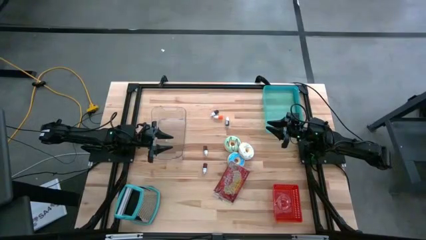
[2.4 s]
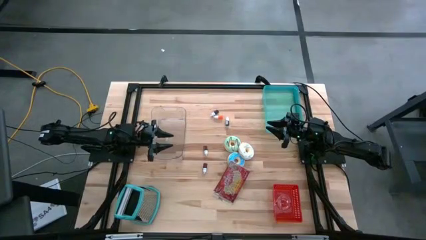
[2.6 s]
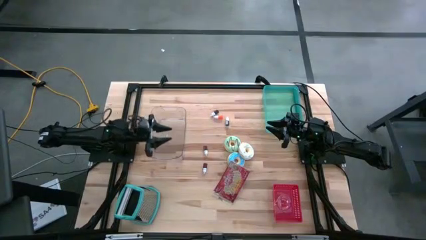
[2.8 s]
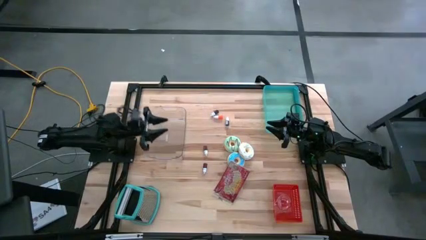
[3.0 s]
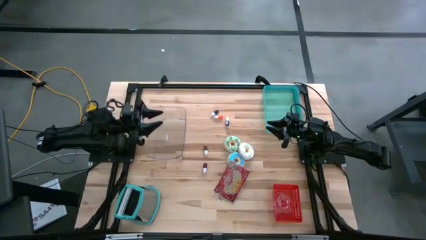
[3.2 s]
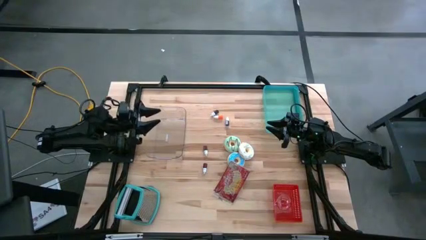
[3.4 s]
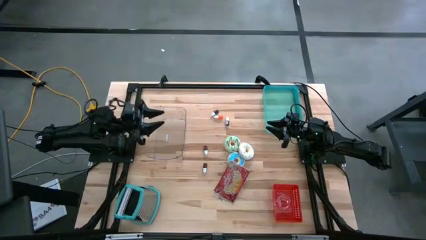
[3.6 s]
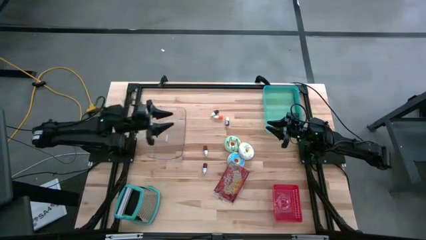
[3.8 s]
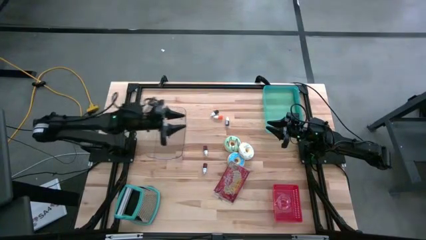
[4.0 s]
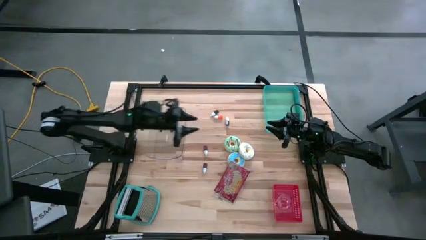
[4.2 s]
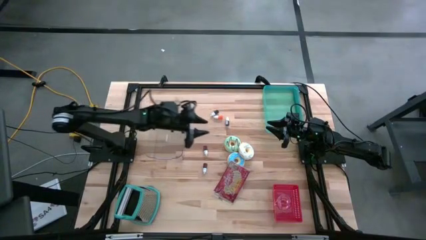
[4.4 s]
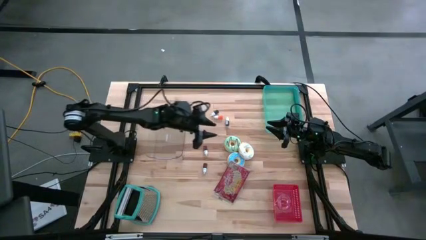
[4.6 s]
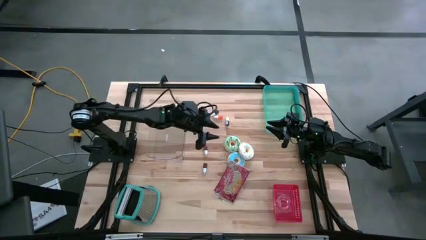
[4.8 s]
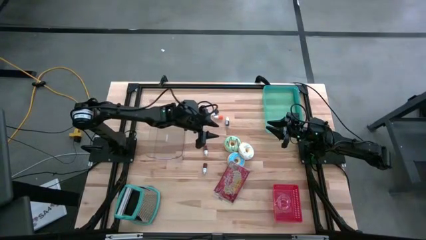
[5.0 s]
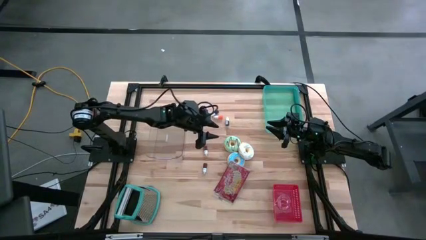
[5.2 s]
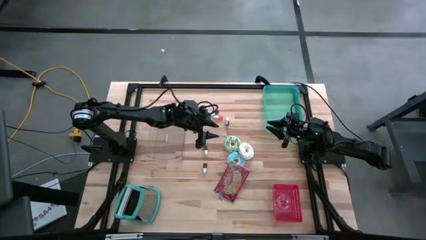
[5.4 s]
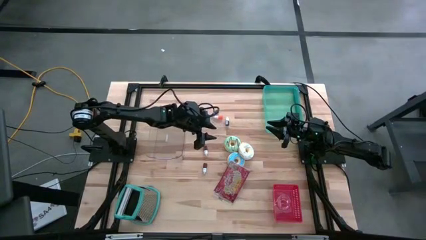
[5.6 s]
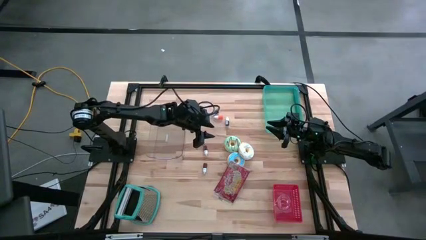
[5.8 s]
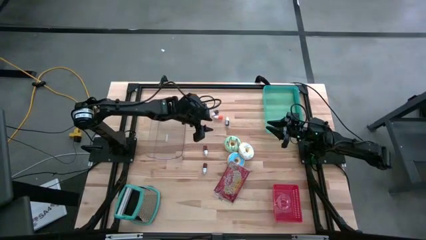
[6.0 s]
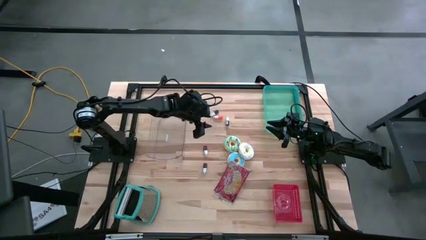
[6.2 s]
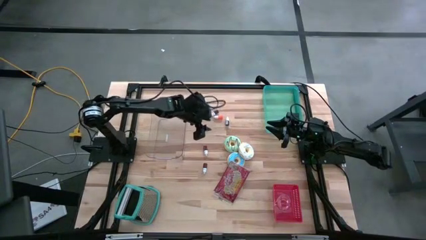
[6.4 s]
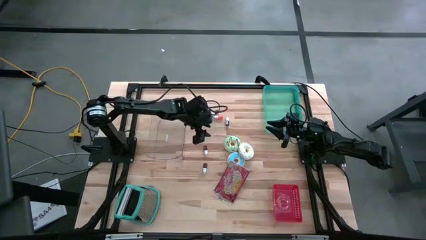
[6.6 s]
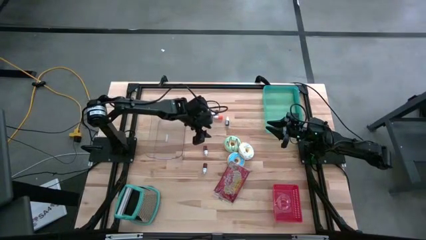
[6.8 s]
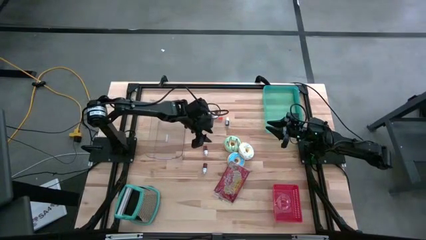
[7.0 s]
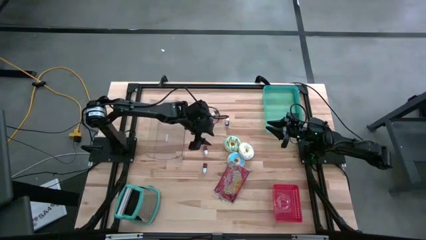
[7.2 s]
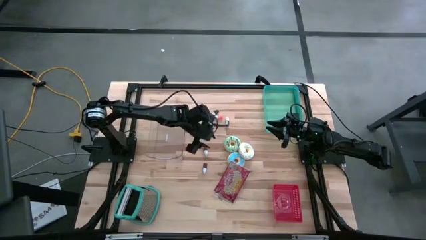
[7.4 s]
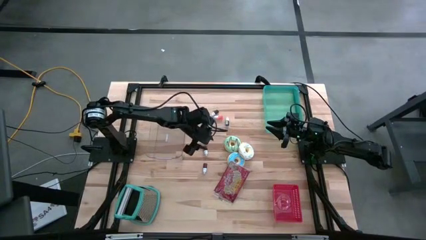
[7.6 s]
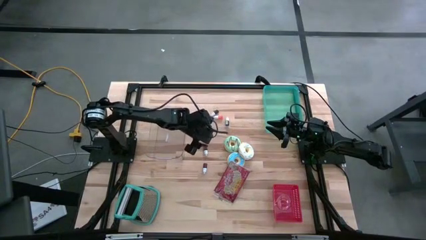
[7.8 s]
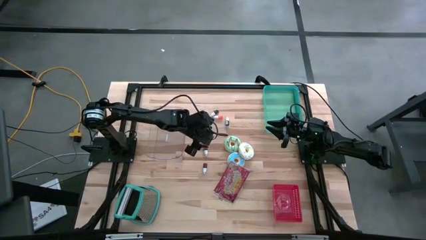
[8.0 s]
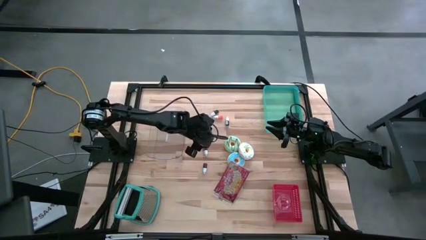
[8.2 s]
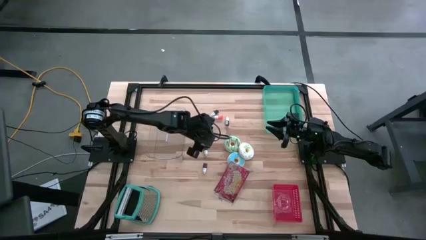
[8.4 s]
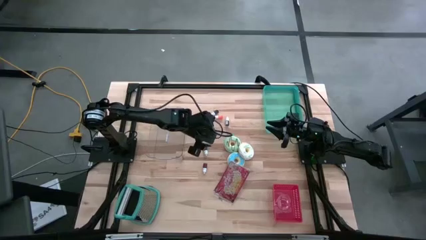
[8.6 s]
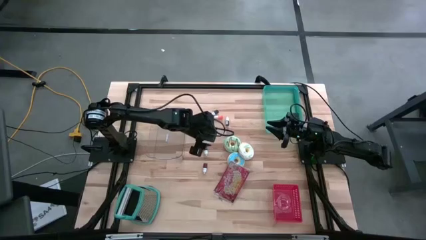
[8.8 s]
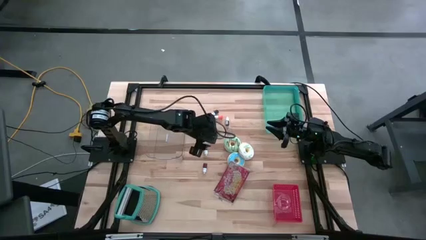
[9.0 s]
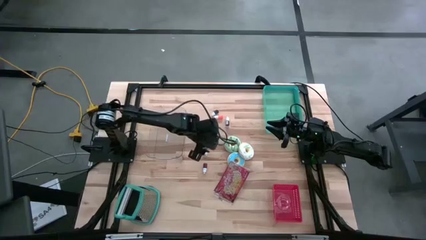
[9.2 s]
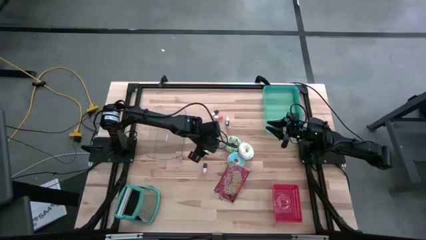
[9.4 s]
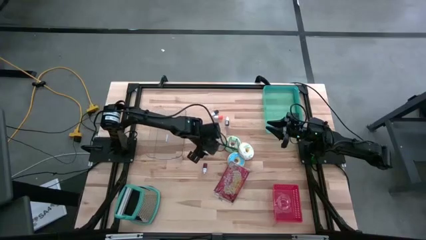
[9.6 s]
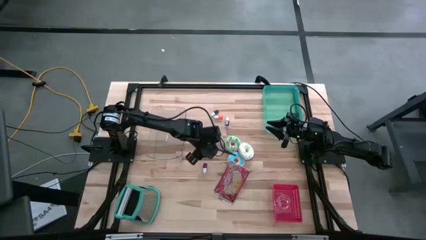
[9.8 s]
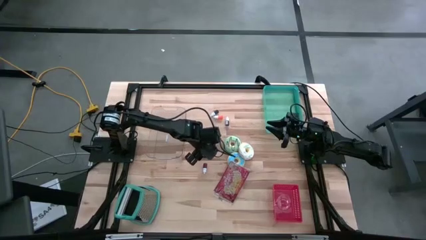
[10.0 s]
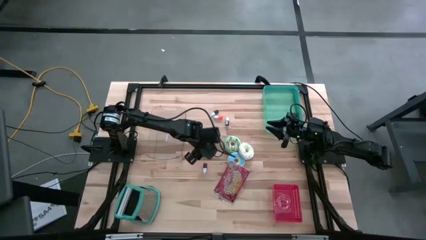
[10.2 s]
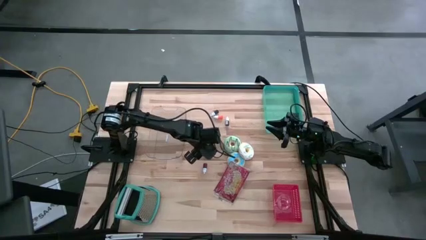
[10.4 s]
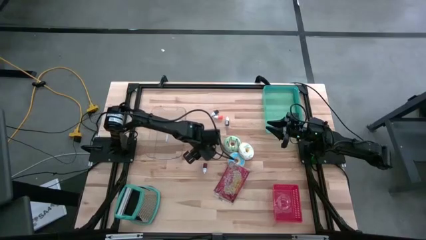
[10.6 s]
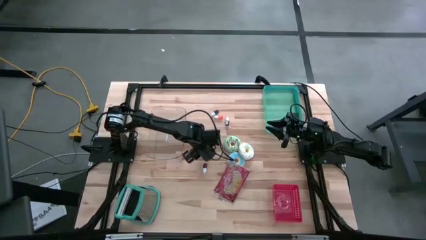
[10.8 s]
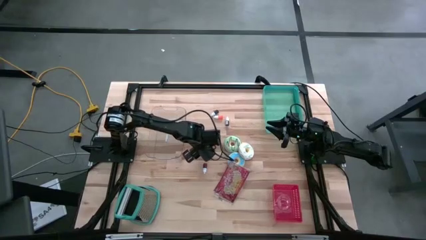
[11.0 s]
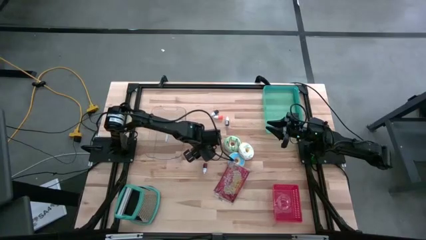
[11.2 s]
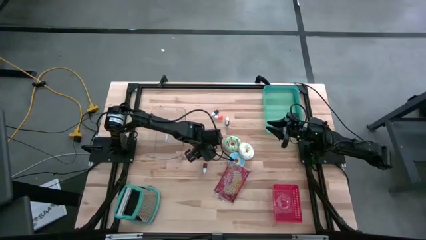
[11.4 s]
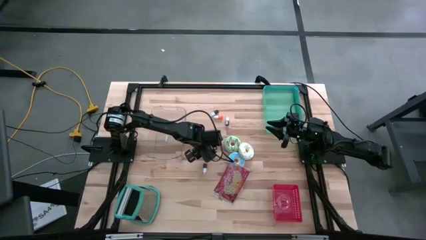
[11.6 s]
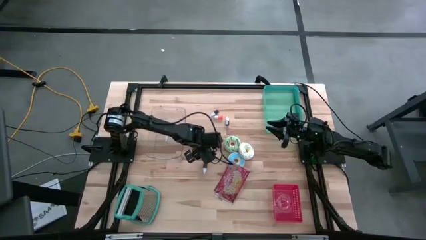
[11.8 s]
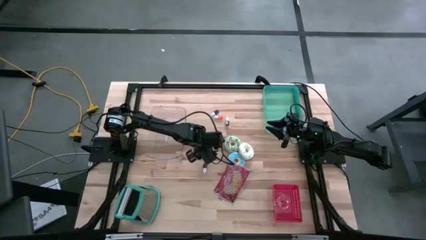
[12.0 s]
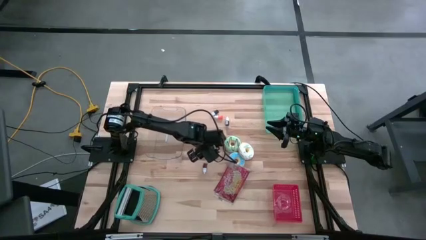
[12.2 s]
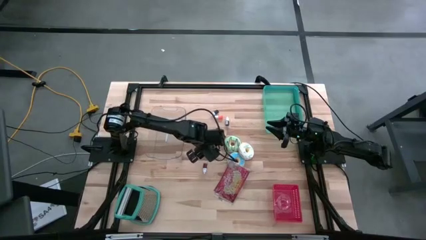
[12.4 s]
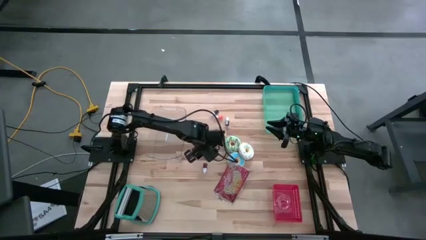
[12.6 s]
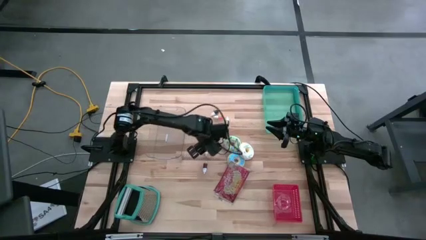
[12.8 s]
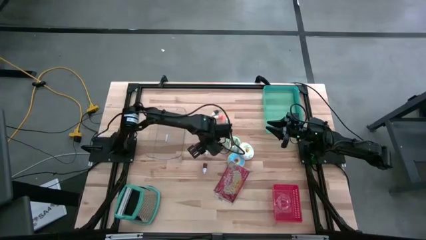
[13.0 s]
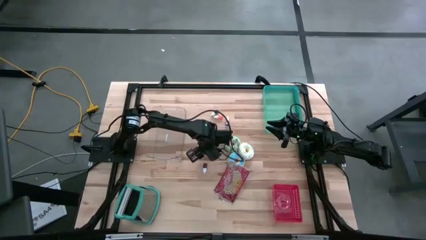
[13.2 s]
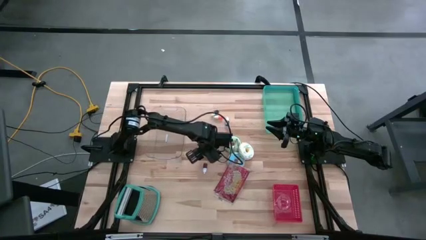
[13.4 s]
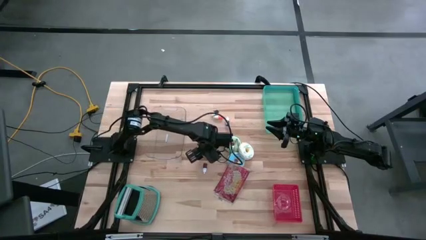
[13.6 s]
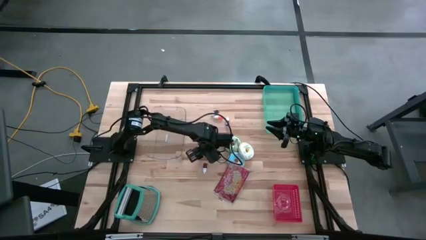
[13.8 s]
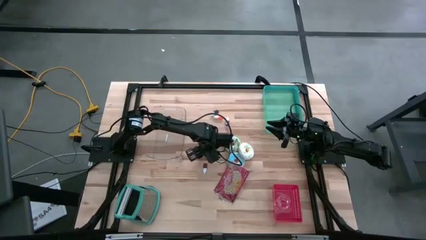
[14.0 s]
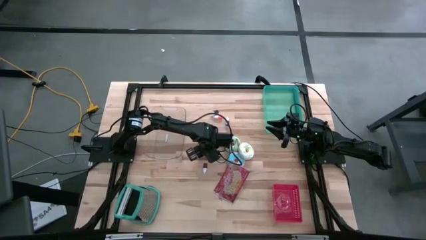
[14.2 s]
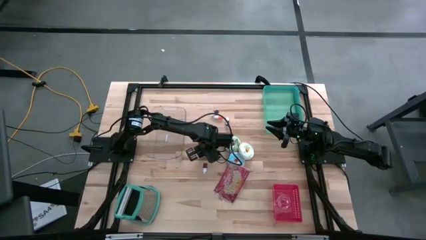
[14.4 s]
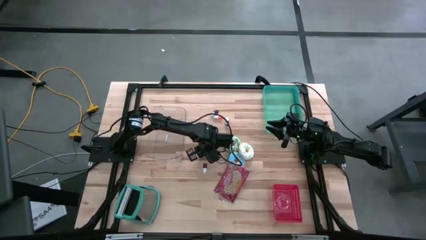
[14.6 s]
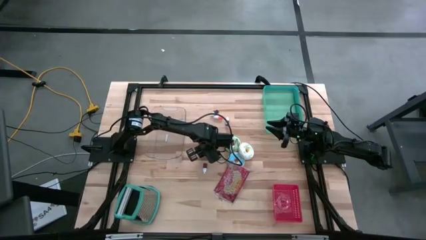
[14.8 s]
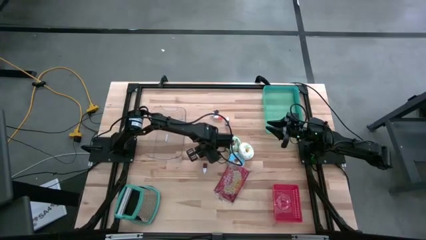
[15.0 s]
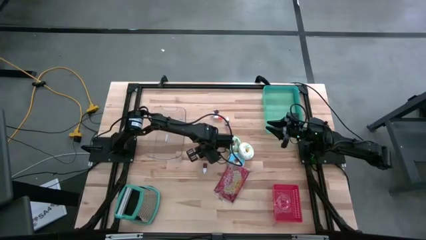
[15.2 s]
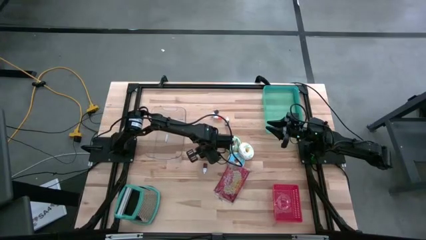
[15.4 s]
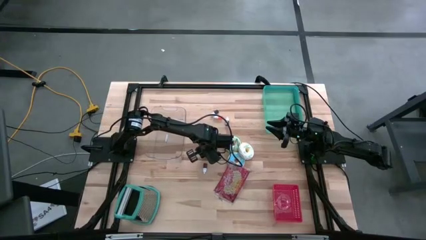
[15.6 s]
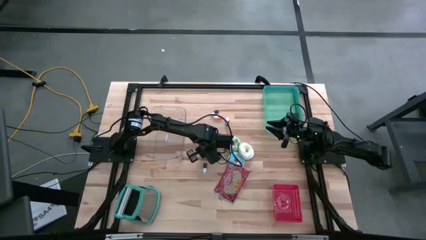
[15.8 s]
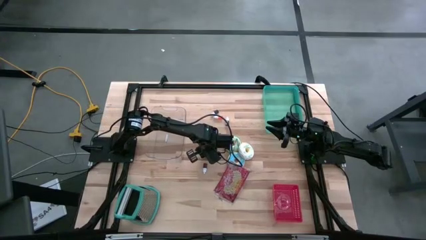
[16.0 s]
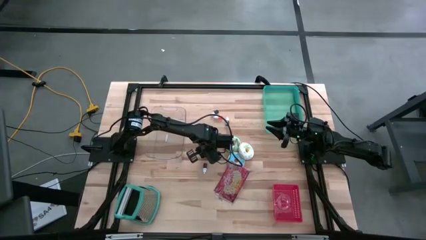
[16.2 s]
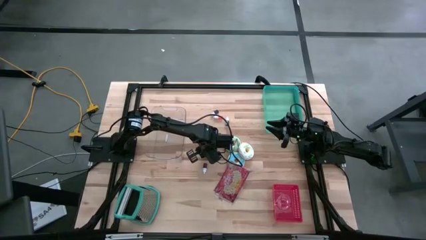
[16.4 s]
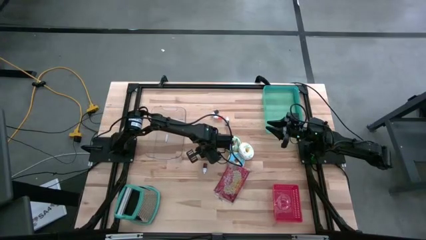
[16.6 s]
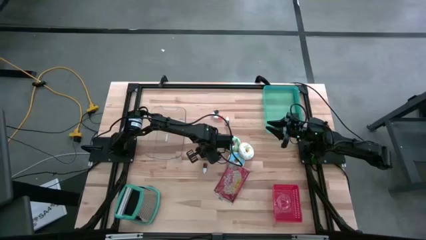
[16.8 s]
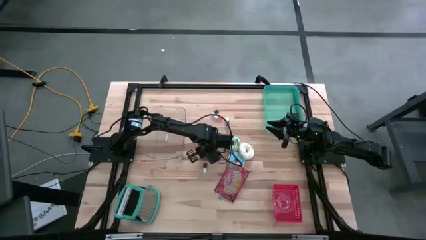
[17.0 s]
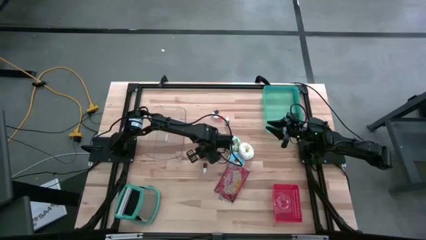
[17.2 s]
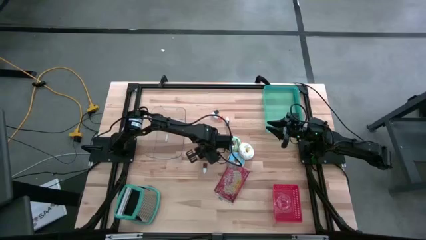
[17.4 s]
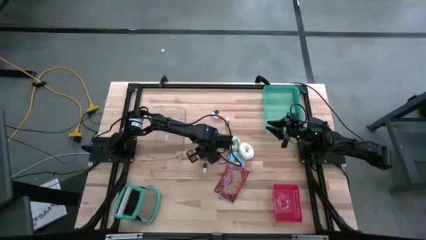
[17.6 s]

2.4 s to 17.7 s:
Put the black food coloring bottle into the red bin
